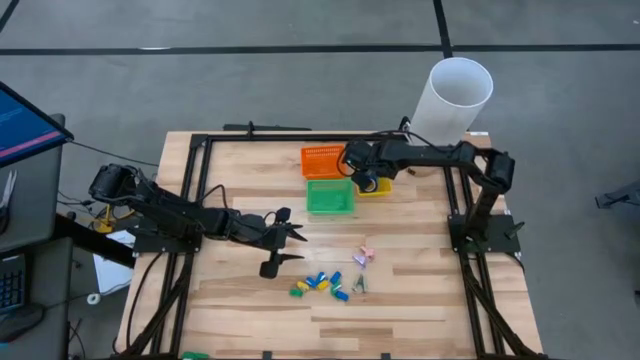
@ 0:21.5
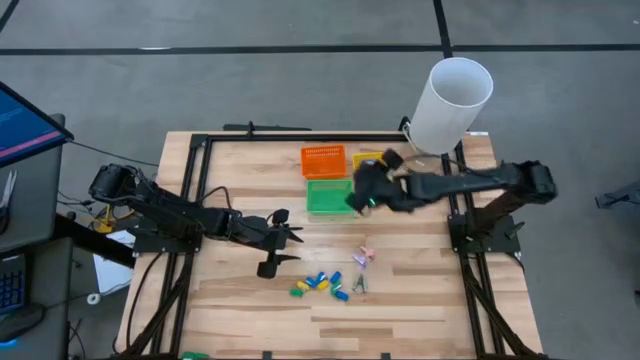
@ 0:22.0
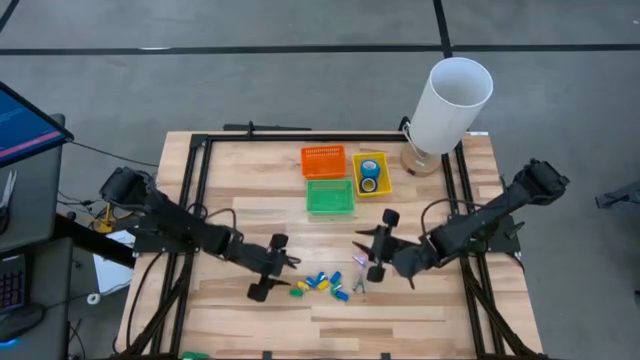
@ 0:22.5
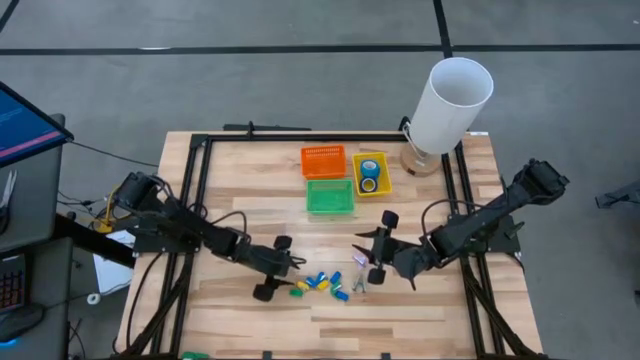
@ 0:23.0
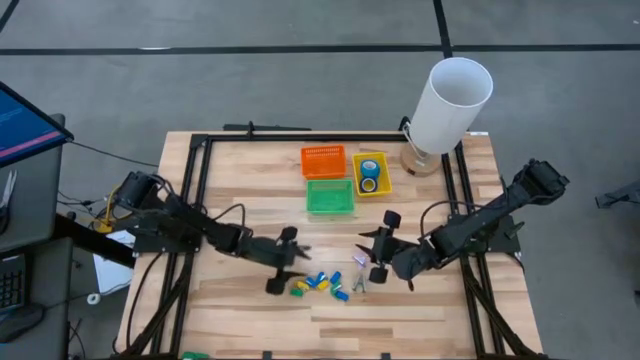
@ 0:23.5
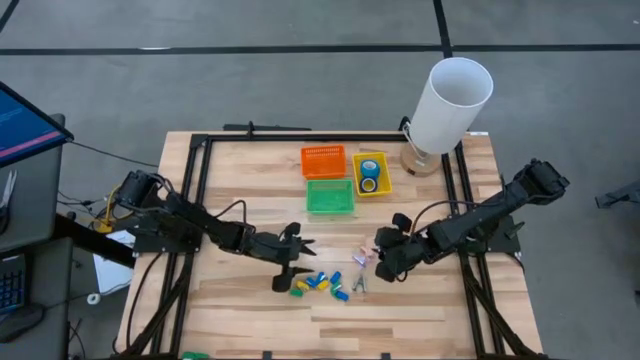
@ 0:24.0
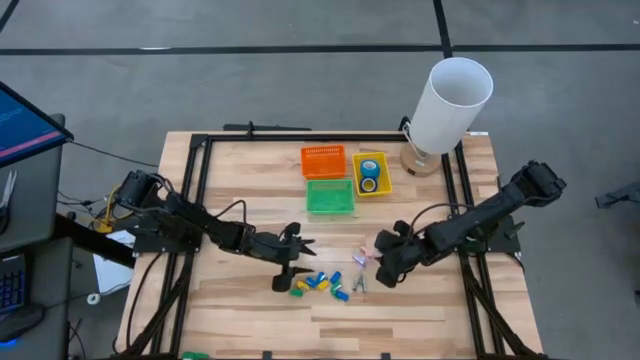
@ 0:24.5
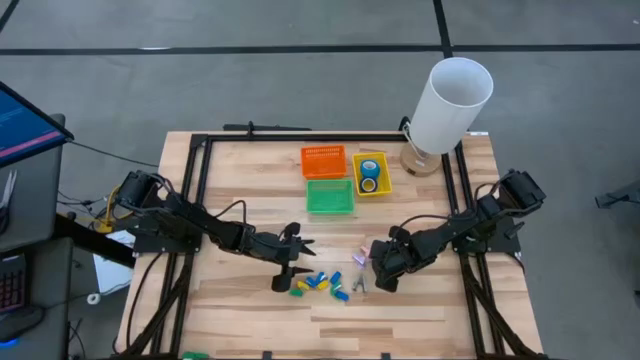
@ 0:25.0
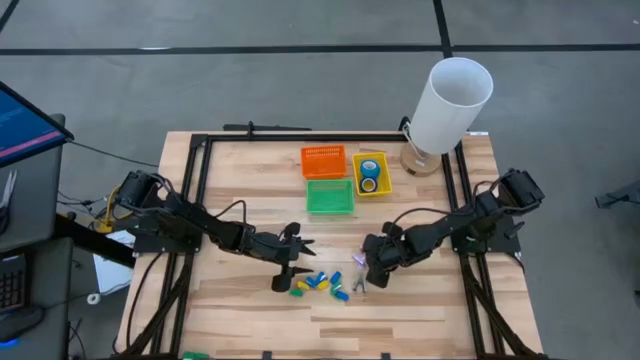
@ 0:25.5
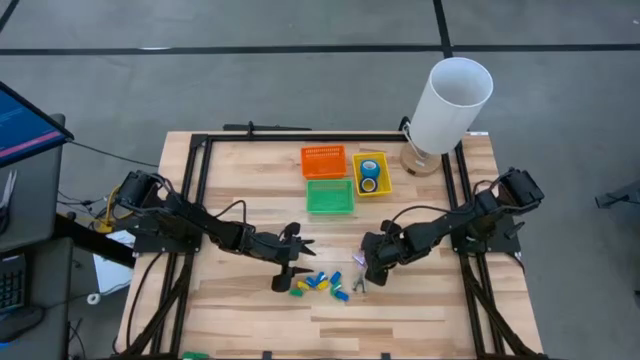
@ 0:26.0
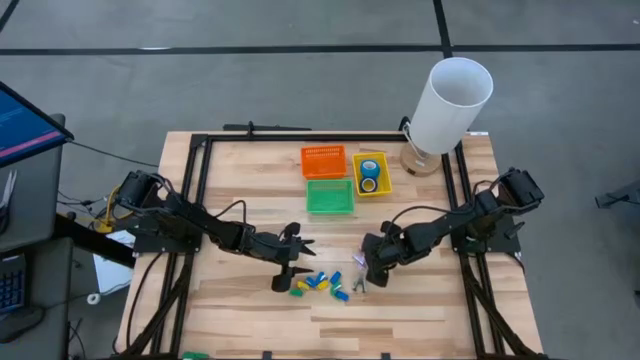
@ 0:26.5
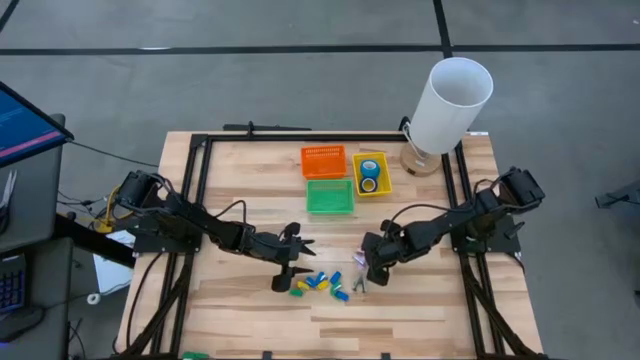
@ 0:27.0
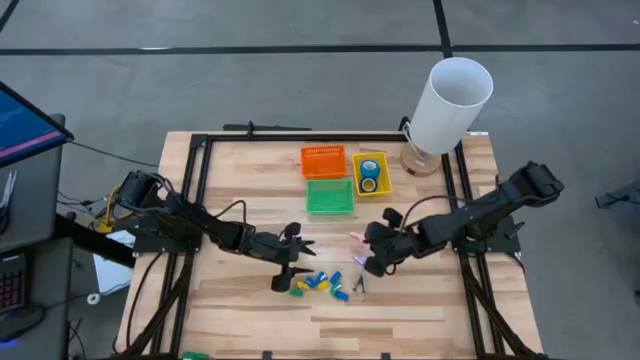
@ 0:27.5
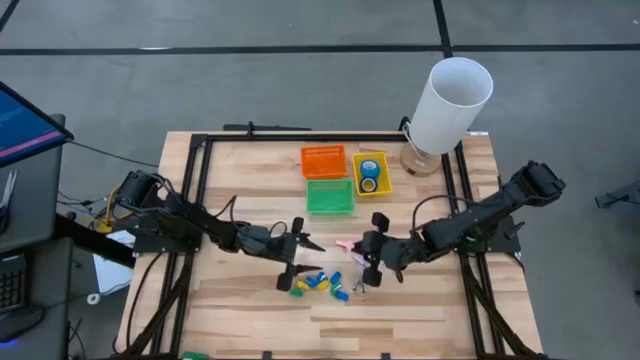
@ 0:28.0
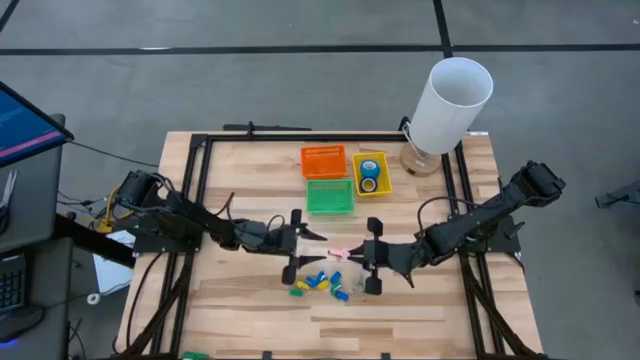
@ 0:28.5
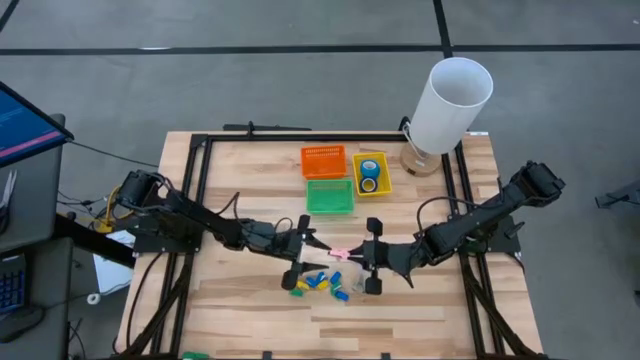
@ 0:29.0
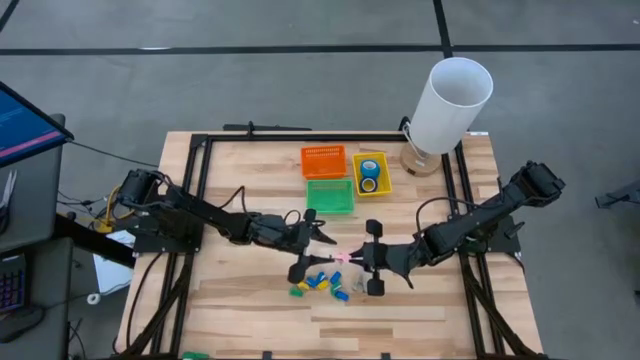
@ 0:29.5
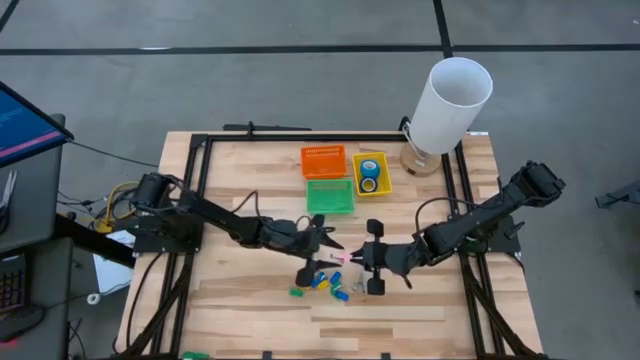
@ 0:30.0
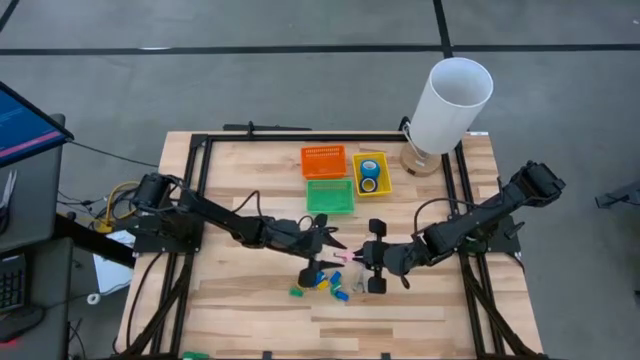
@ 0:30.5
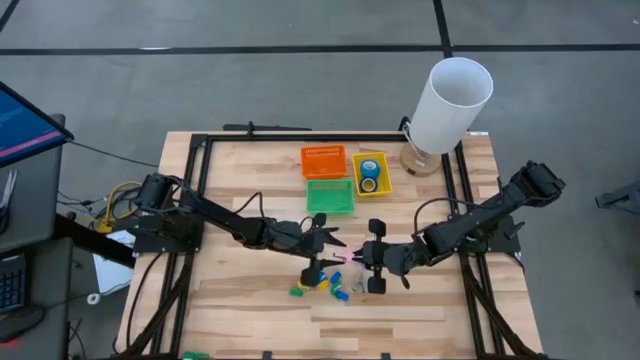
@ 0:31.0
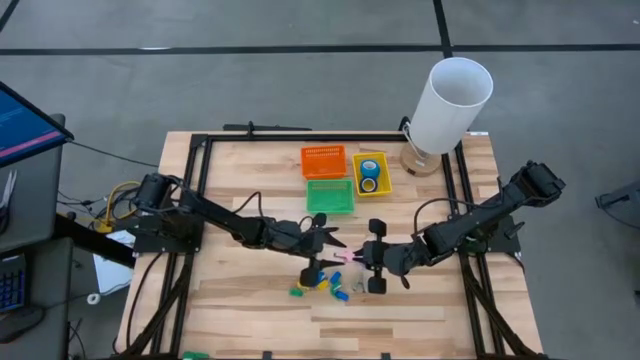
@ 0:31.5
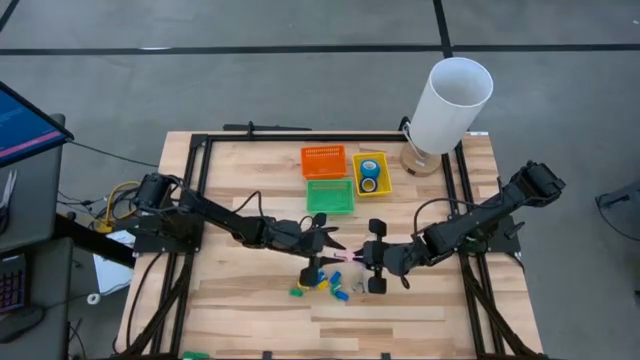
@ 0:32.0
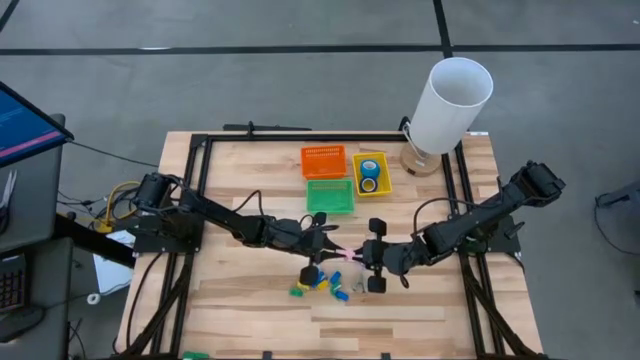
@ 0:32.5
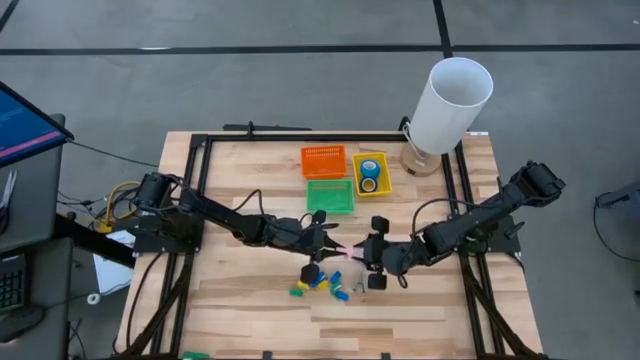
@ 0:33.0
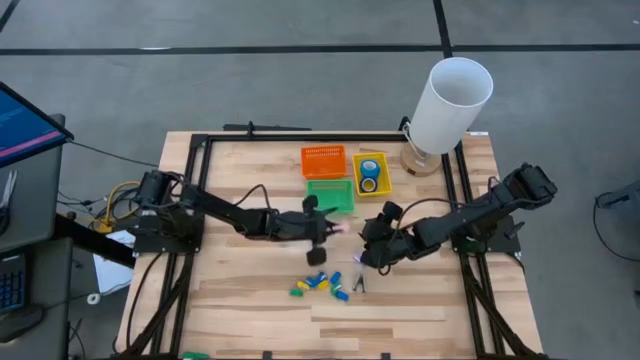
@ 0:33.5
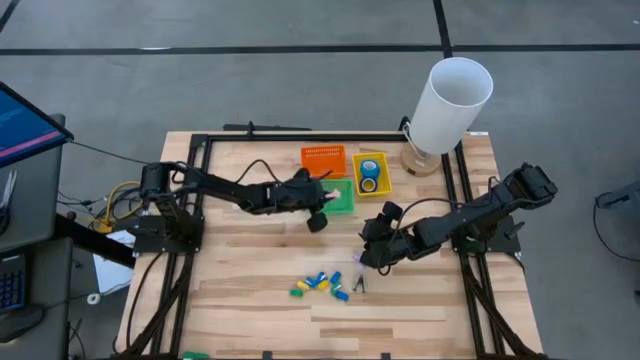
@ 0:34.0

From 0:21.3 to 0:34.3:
Task: Pick and place Stapler, Stapler remover, tape
Put the pink staple remover into the green bin

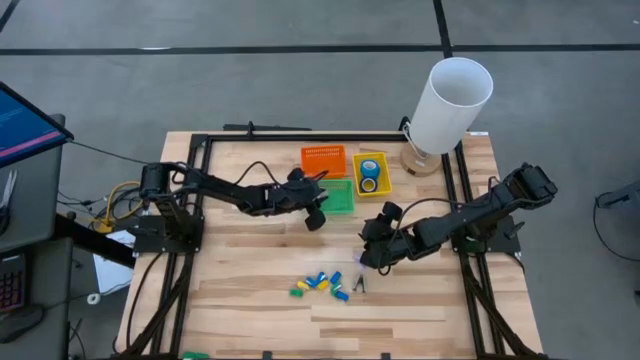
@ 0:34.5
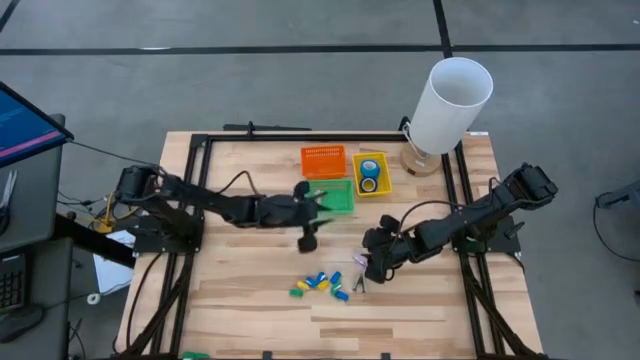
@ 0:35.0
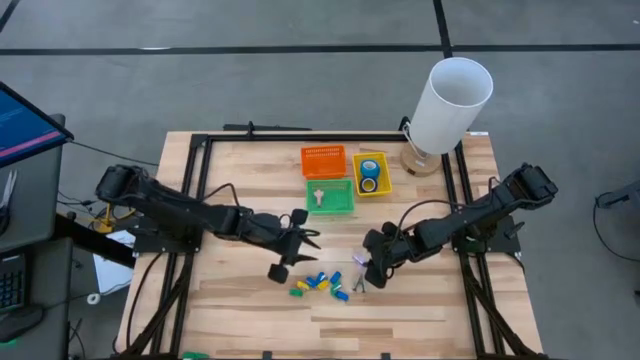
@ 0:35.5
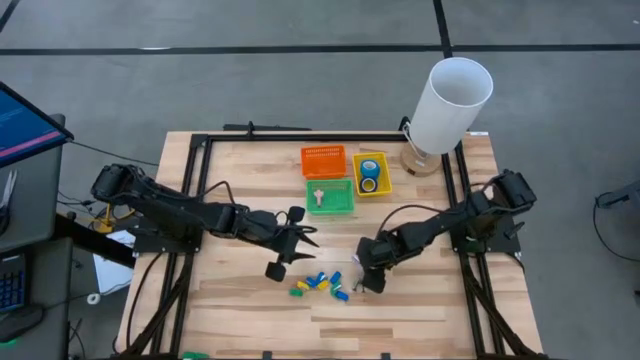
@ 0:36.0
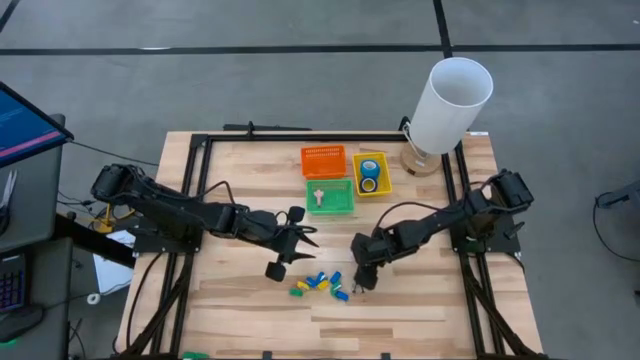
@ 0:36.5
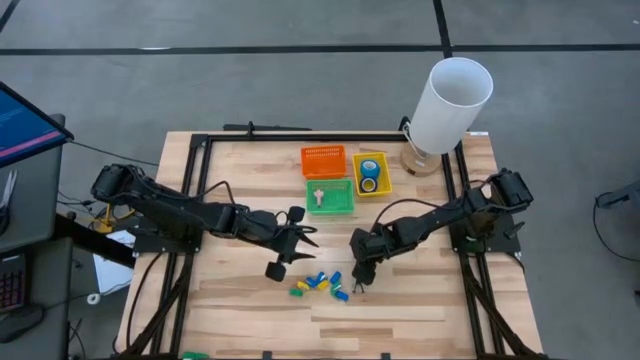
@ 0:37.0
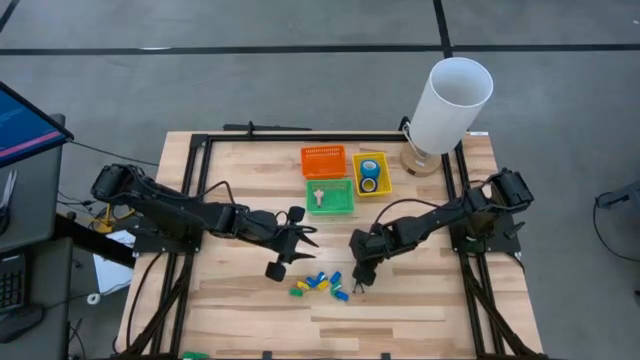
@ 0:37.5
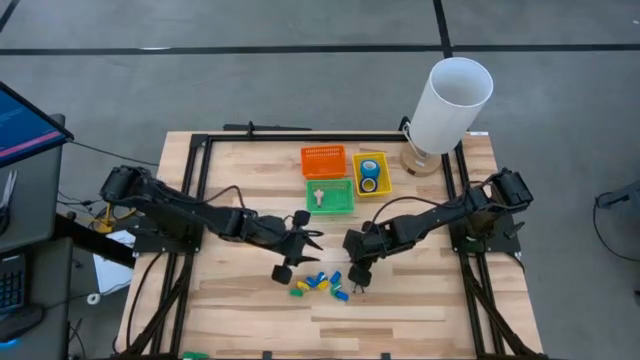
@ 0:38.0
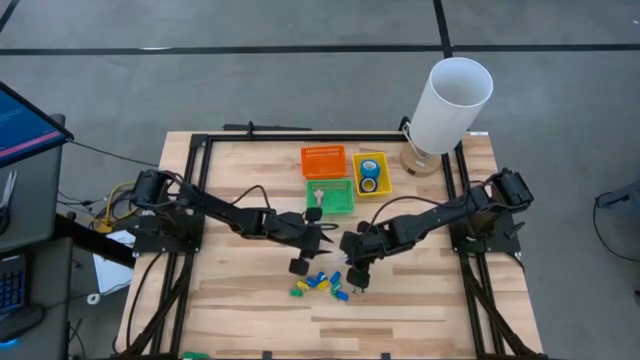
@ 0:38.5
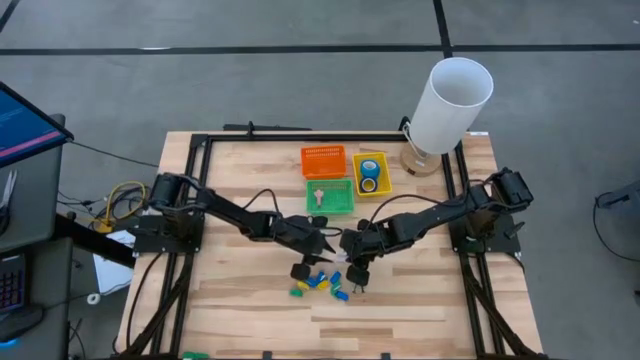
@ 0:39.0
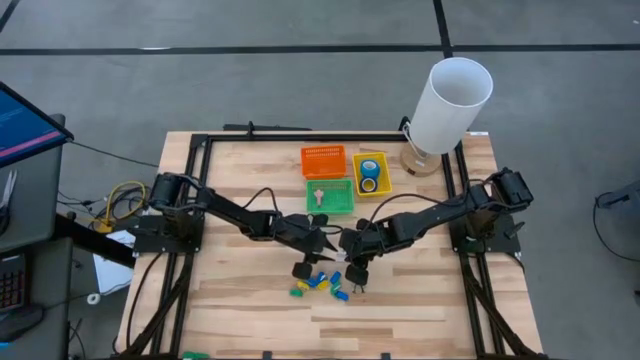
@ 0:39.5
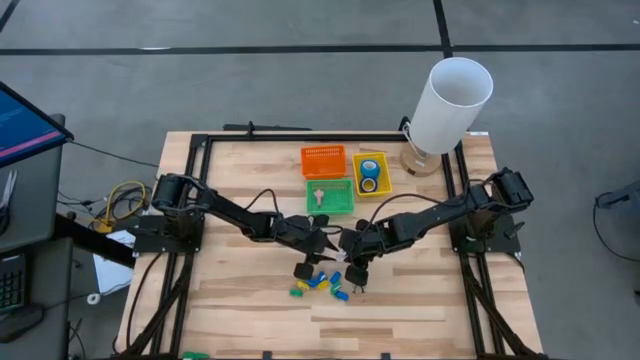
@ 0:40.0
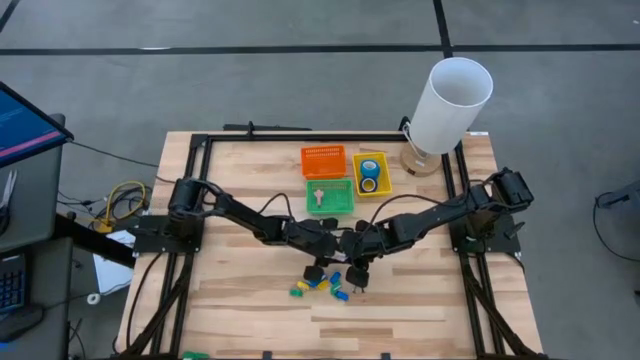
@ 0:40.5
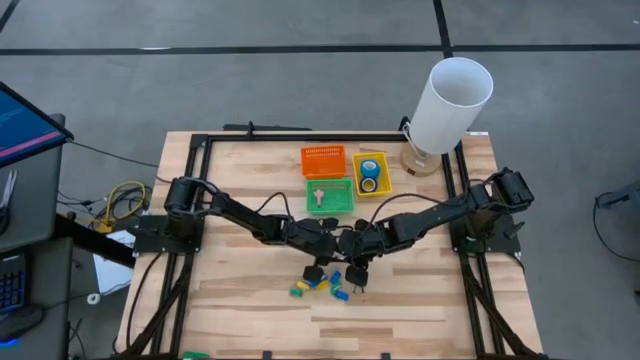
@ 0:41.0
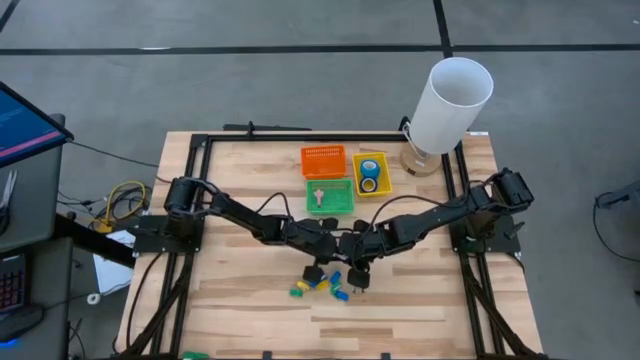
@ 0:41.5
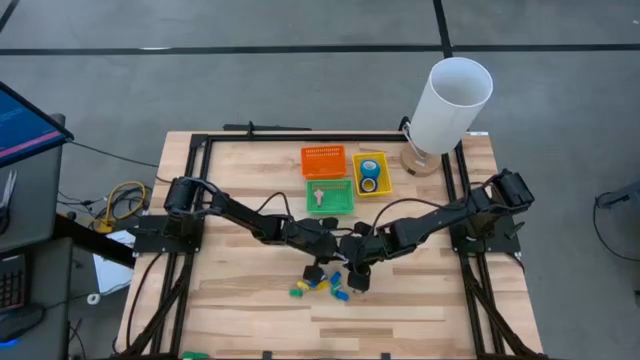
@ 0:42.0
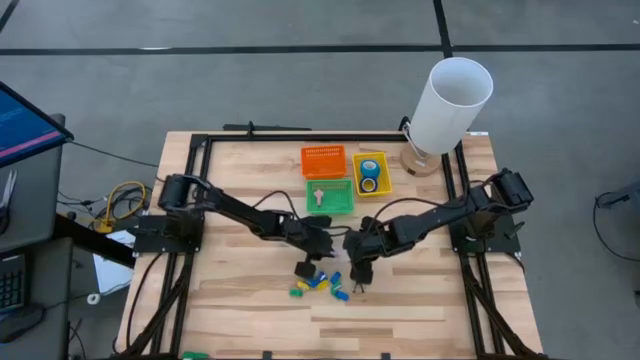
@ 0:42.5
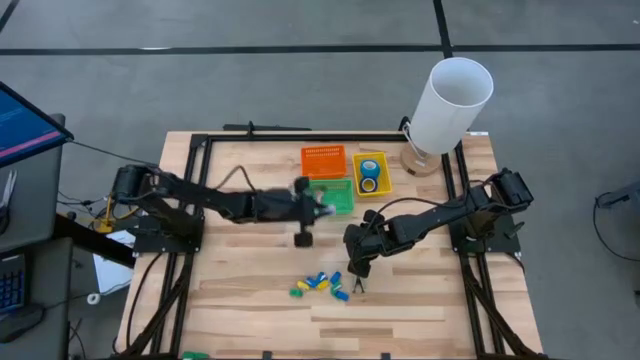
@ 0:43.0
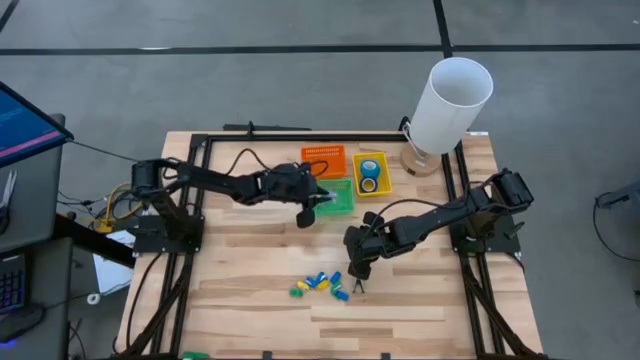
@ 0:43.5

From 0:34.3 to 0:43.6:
Put the purple staple remover into the green bin
